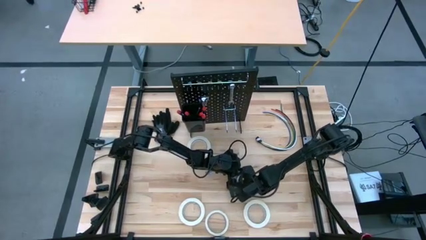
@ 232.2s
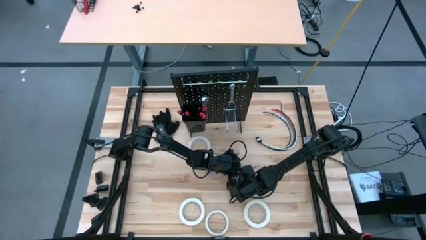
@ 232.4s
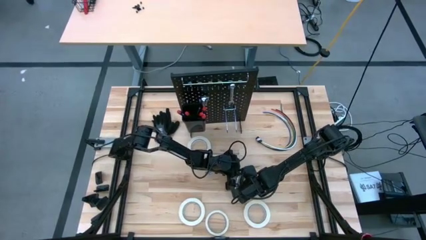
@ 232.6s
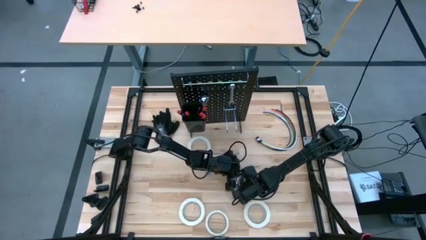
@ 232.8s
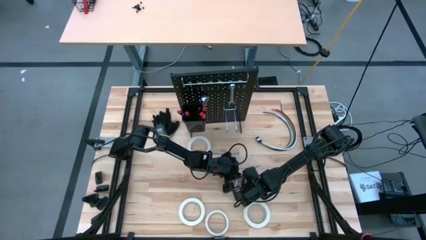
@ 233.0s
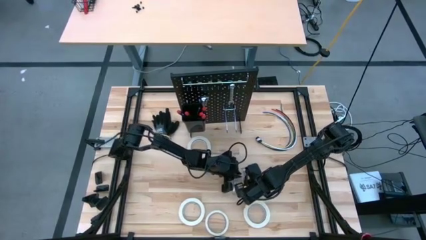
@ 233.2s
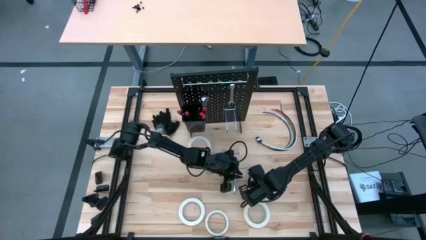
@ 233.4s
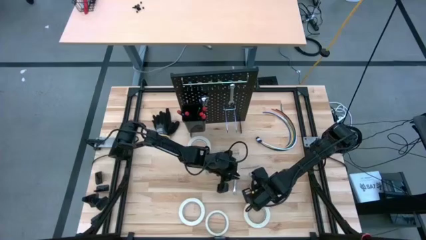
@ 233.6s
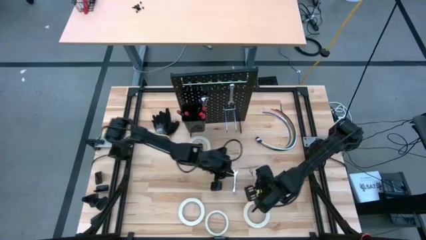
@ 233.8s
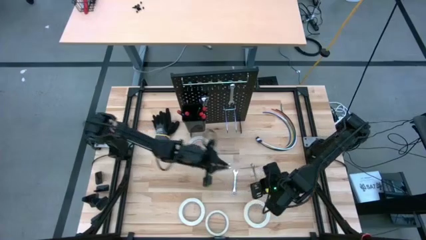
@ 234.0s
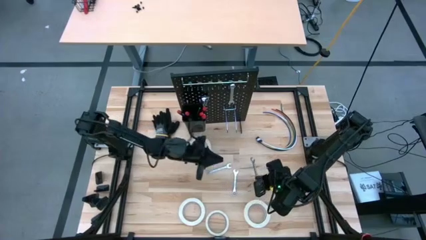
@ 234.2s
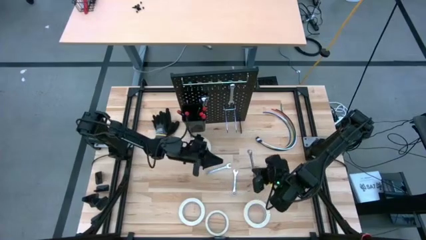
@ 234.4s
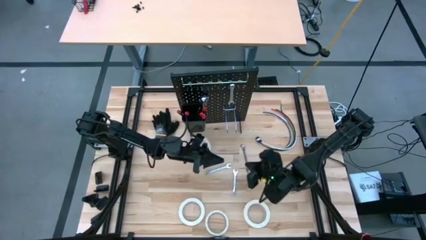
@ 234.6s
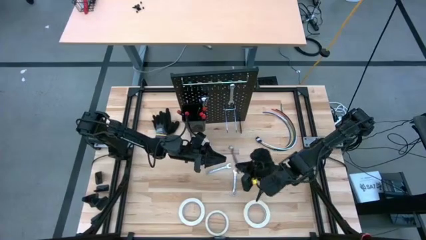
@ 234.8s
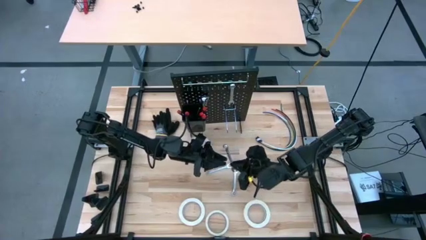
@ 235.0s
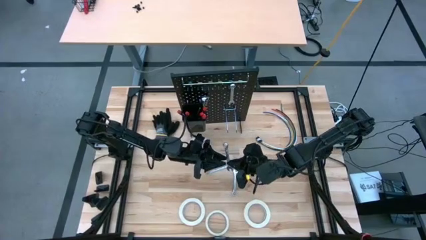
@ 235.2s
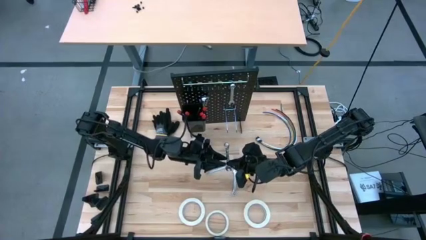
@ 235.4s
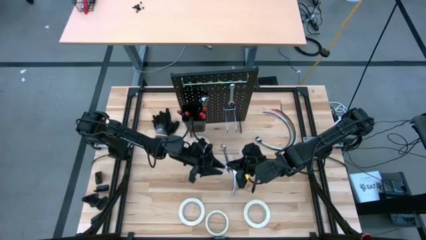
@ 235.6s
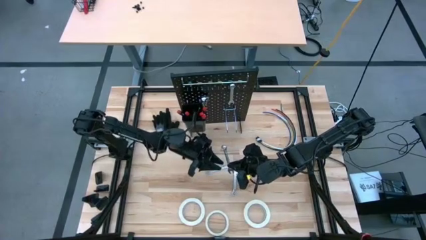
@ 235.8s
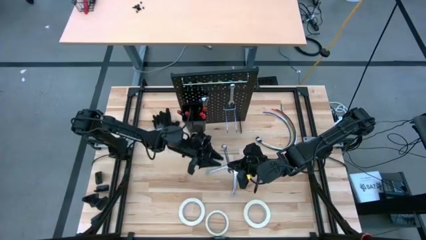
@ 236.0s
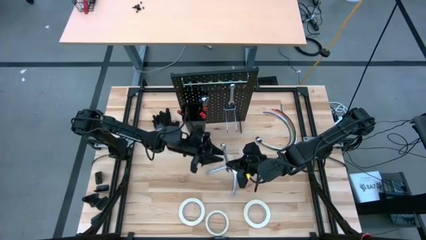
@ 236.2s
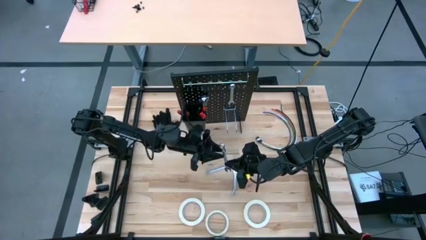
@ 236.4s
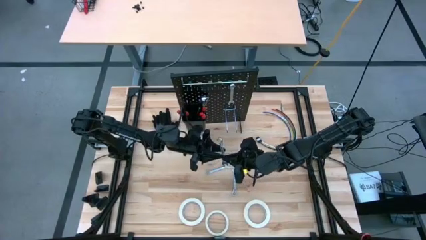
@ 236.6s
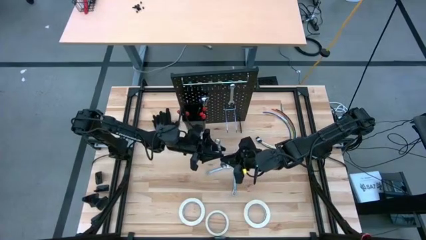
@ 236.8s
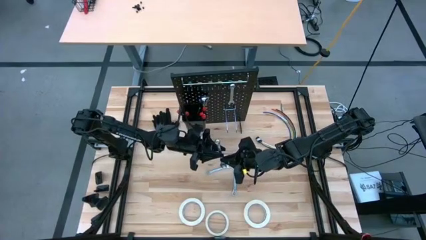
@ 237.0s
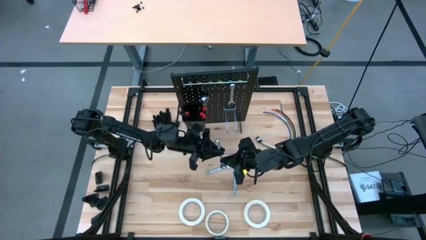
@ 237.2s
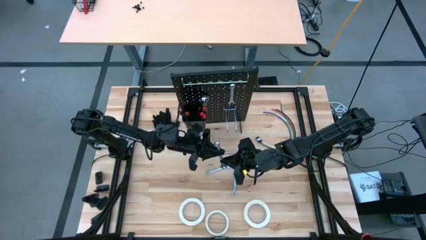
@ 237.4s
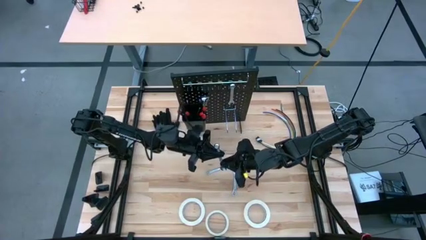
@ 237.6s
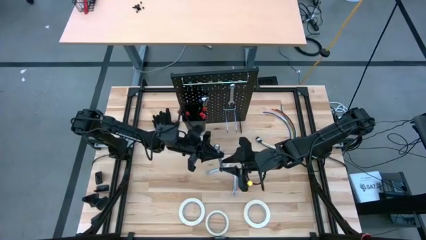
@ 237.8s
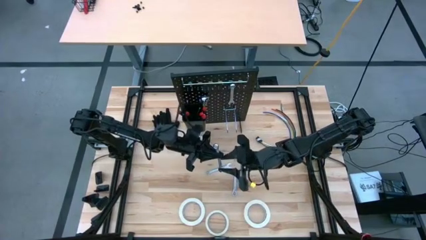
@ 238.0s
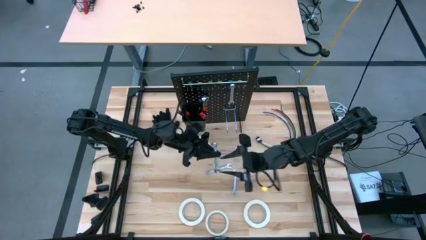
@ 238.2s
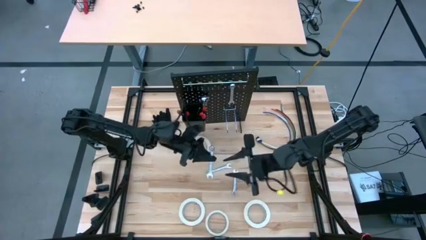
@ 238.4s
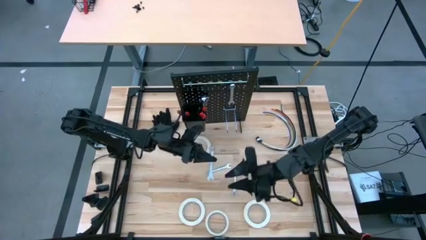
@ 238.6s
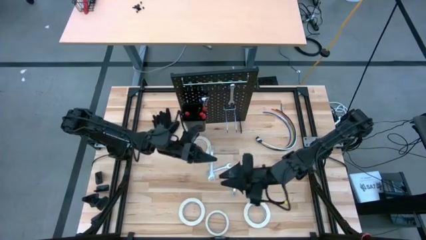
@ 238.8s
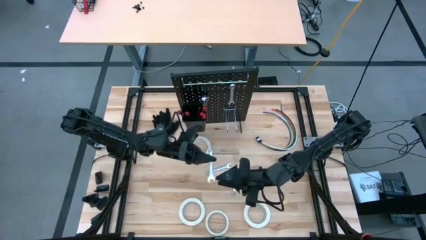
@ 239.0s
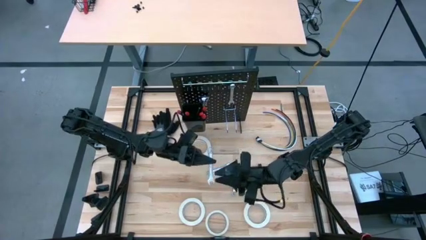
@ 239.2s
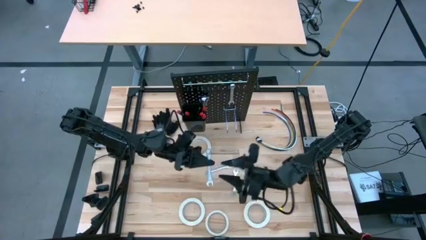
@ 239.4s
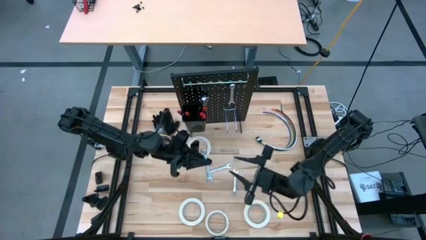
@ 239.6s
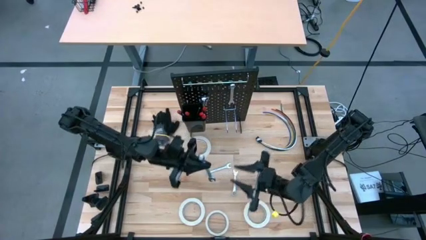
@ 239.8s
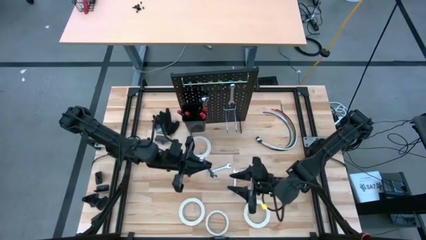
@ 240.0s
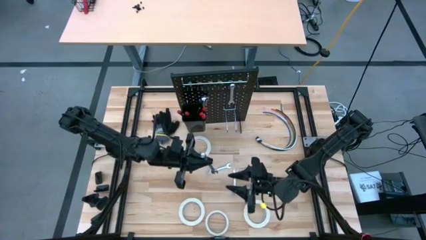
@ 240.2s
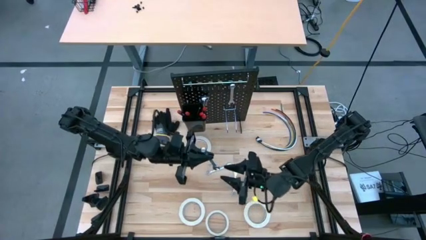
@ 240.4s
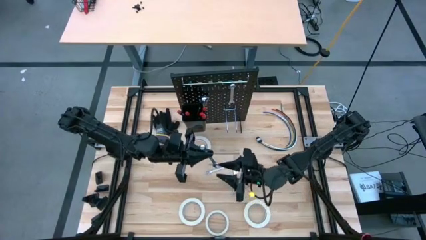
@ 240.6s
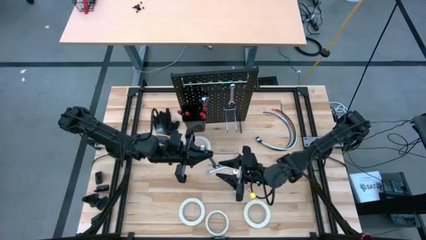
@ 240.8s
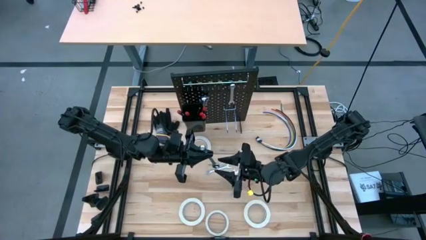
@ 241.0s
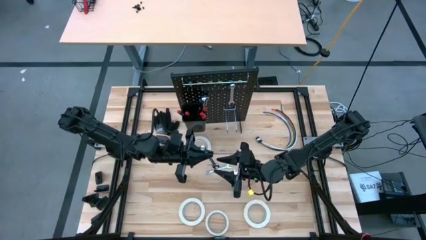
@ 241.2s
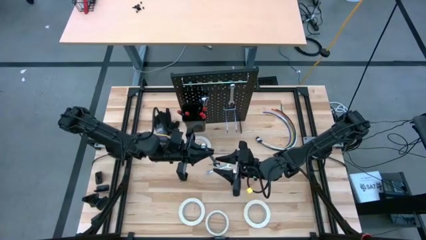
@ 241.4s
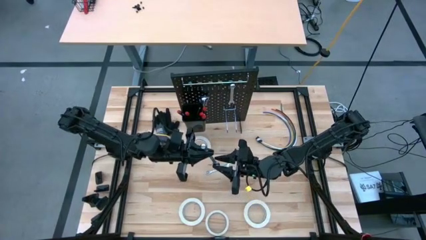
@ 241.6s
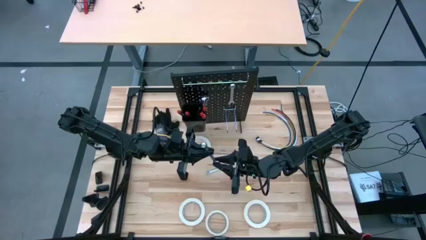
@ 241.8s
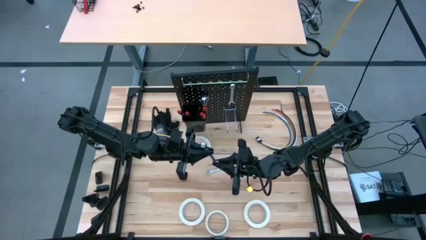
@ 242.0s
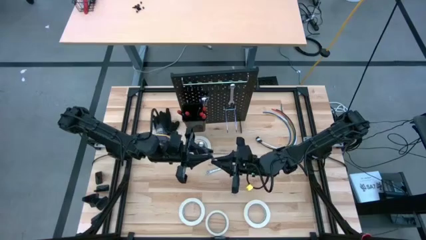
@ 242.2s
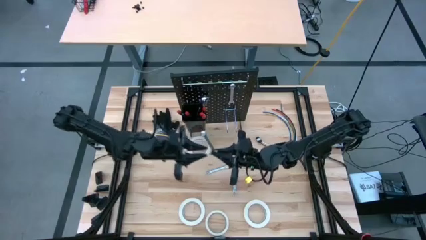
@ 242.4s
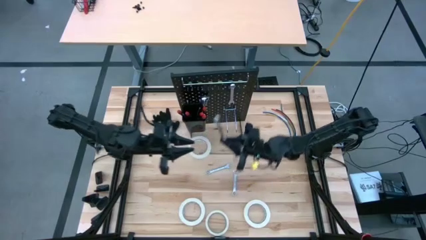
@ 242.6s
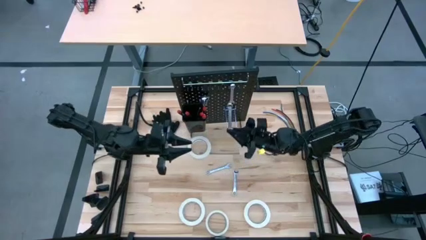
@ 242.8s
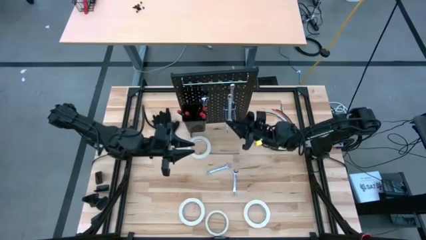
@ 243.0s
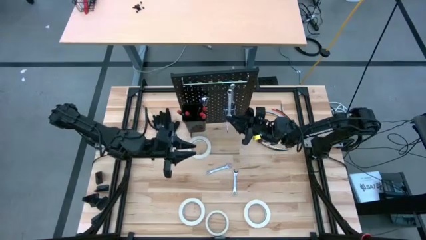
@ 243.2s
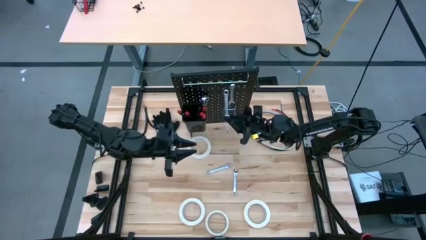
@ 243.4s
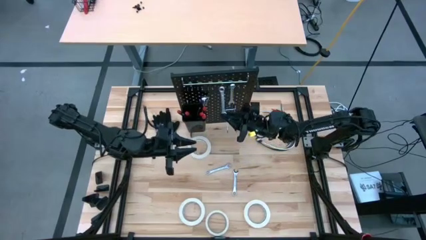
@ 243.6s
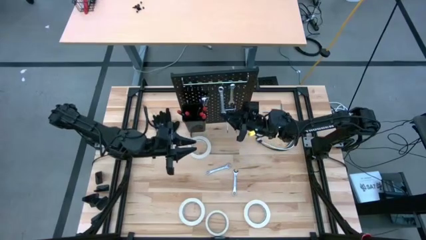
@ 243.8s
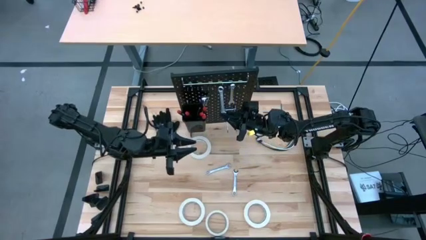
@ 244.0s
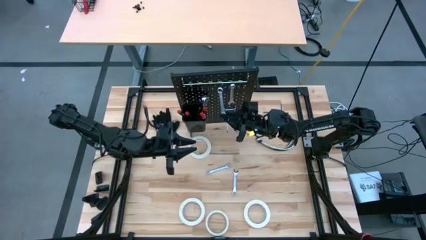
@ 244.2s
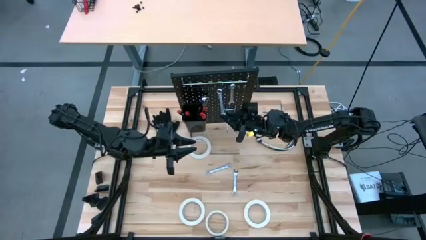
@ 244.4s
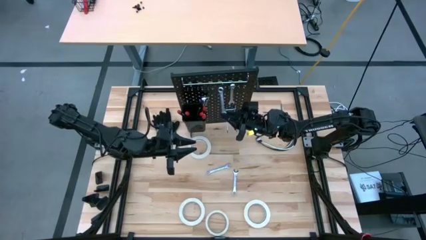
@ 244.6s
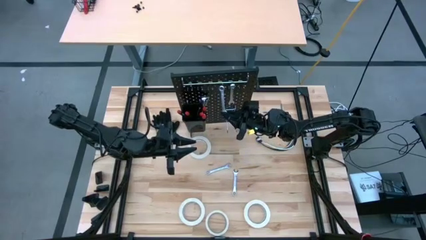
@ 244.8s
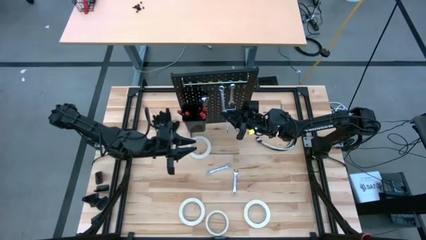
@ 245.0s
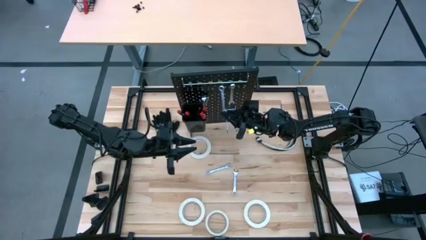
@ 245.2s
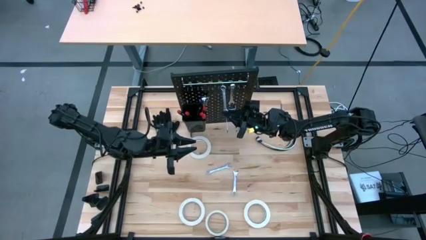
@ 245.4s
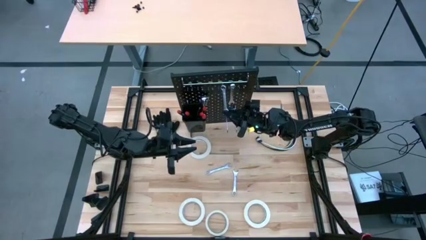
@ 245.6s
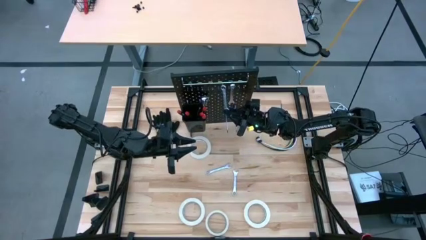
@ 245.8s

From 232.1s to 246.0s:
Task: Hang tools onto peg board
Hang the silver wrench on the peg board

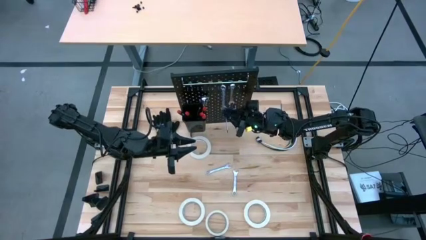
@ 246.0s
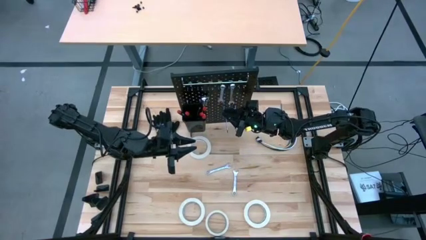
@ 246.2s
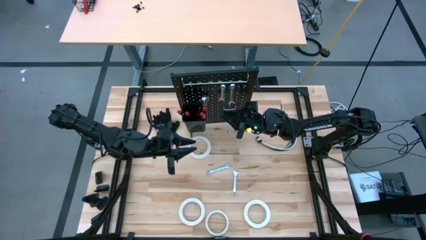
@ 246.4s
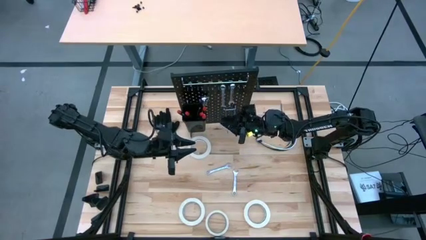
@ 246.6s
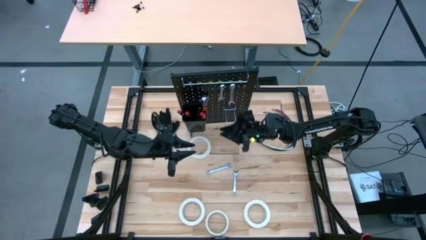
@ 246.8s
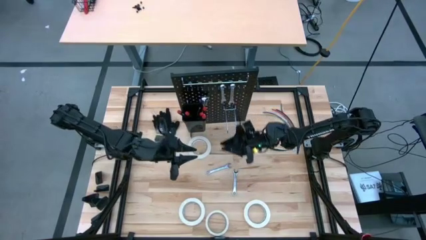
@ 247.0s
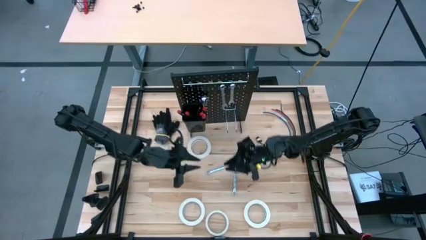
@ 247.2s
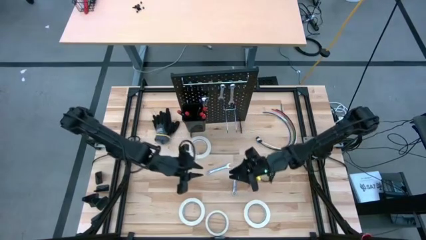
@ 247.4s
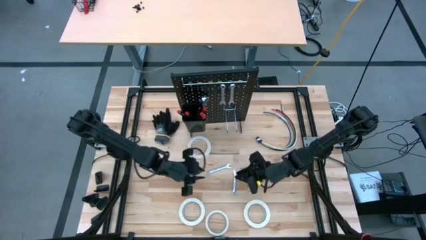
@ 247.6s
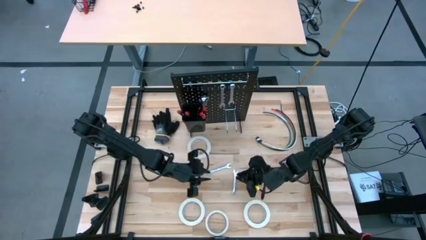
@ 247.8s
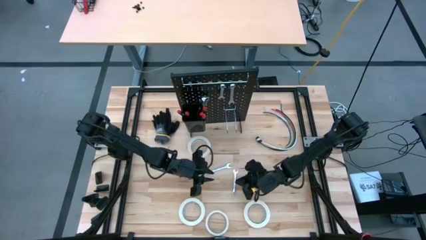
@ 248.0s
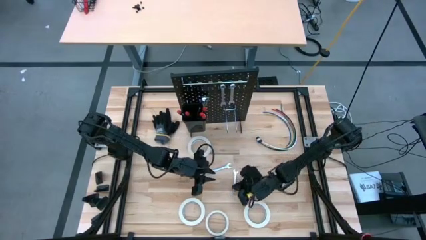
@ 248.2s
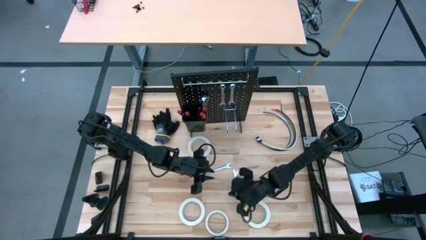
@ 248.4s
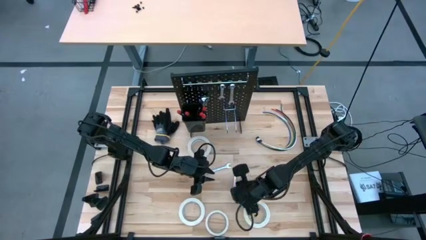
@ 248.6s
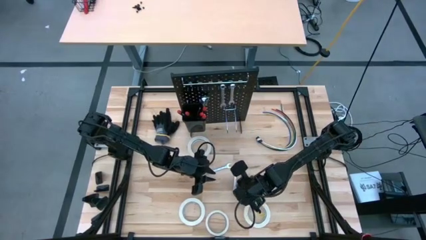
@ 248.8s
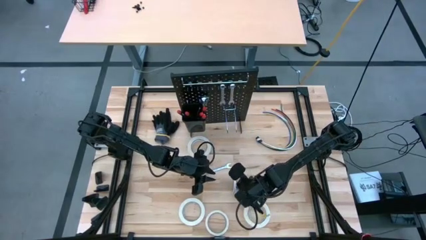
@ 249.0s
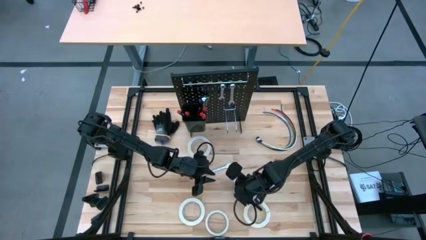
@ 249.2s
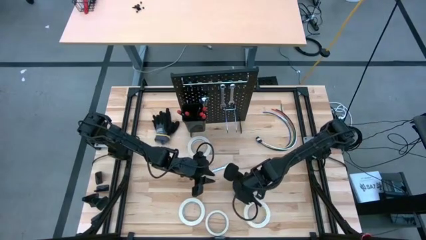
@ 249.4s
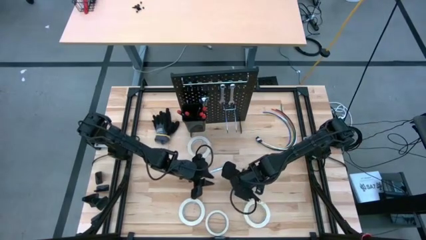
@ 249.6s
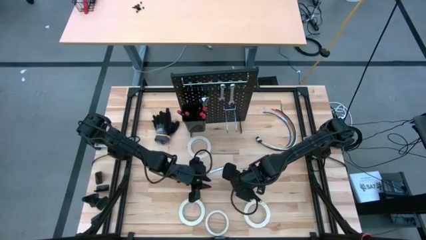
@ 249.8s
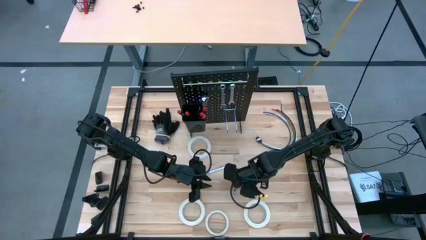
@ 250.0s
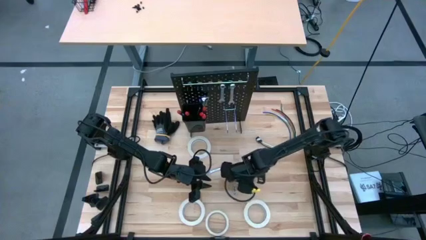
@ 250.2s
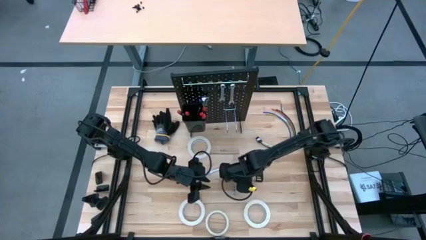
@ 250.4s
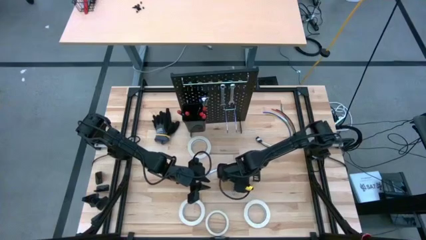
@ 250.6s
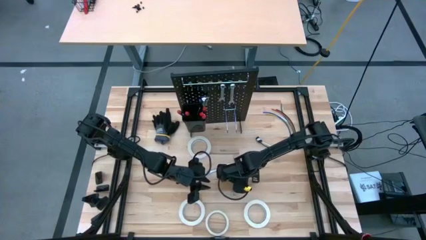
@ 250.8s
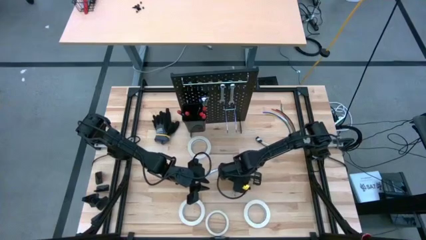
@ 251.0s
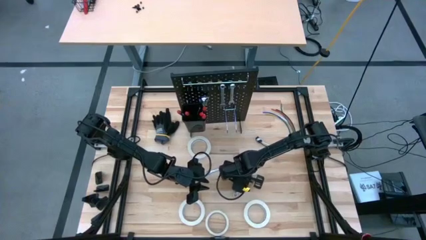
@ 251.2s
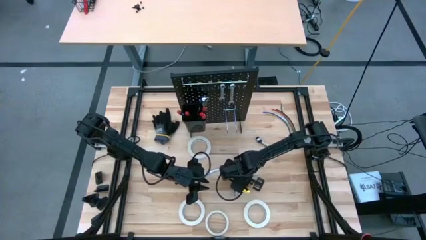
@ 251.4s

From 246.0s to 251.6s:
Hang the silver wrench on the peg board
